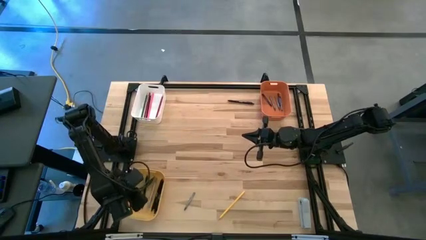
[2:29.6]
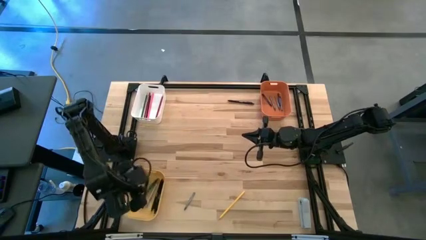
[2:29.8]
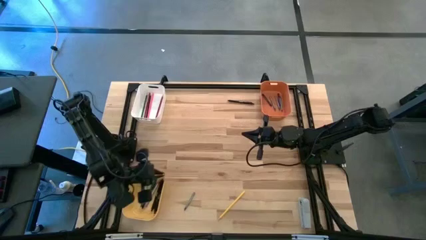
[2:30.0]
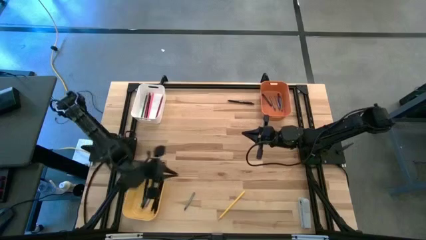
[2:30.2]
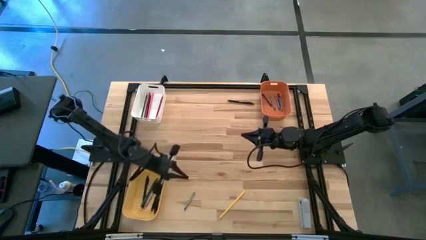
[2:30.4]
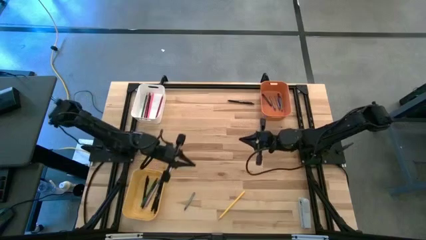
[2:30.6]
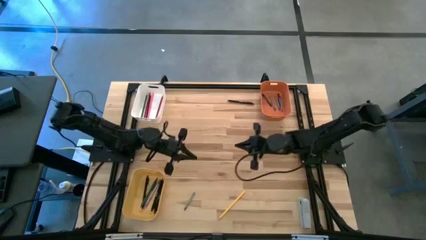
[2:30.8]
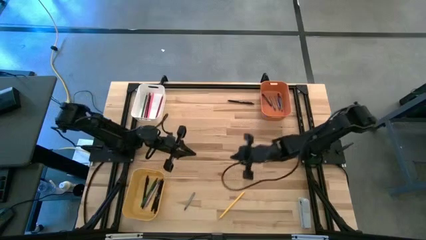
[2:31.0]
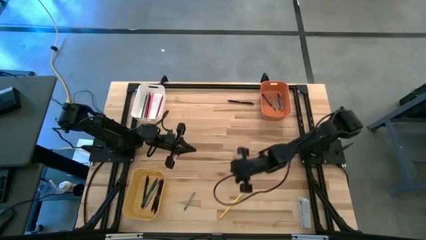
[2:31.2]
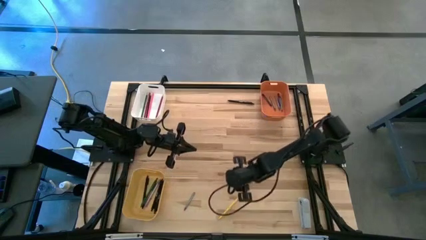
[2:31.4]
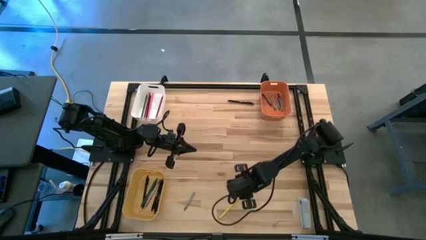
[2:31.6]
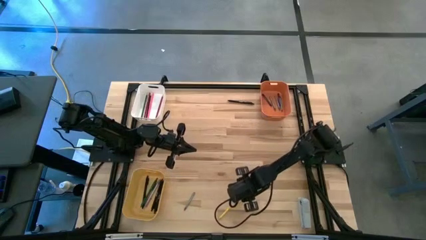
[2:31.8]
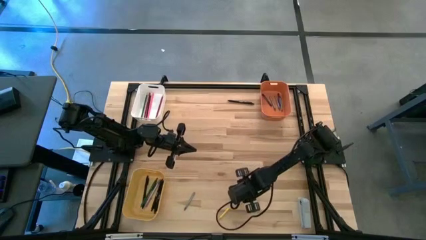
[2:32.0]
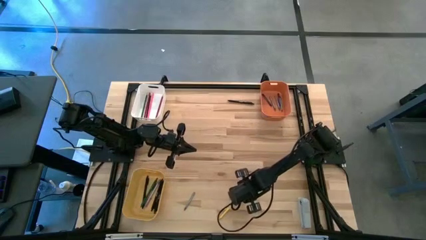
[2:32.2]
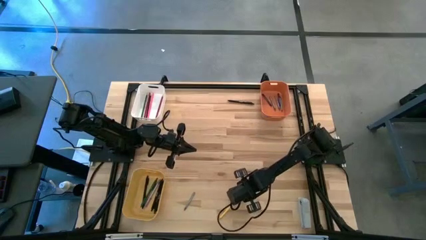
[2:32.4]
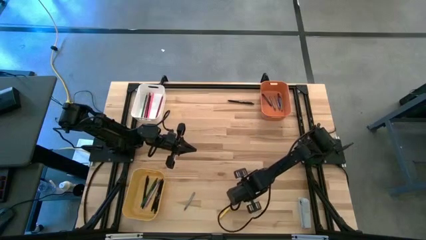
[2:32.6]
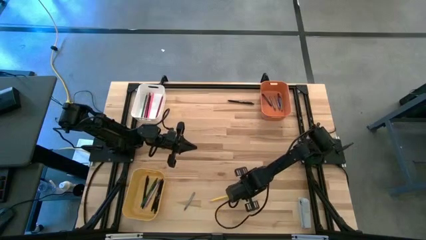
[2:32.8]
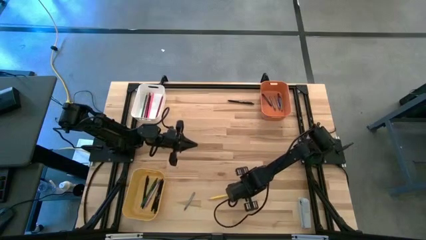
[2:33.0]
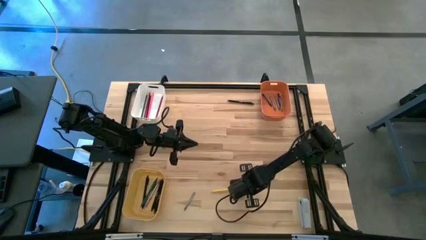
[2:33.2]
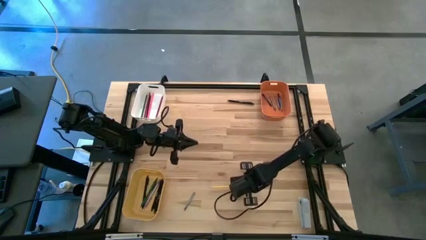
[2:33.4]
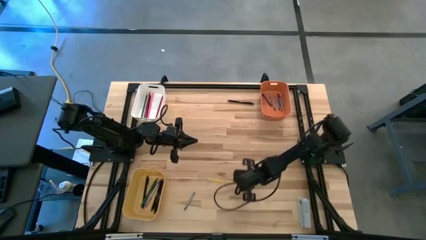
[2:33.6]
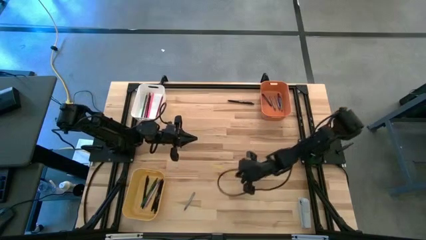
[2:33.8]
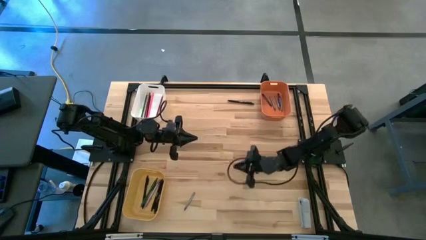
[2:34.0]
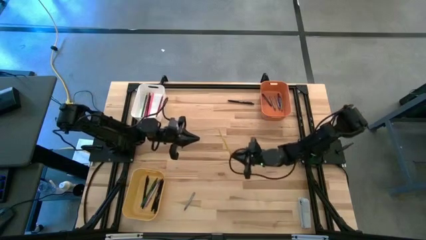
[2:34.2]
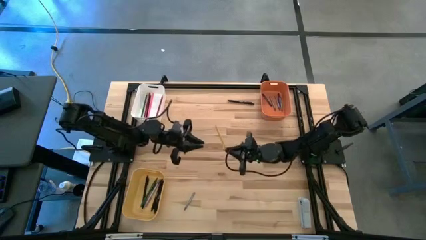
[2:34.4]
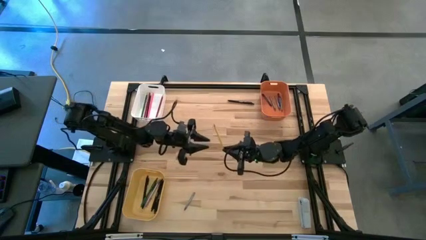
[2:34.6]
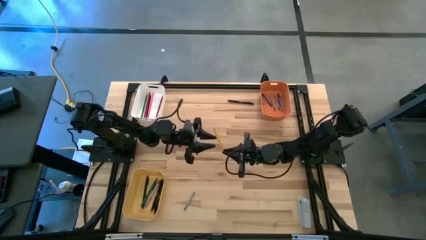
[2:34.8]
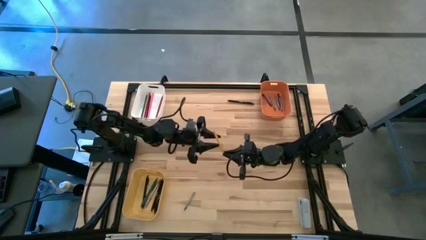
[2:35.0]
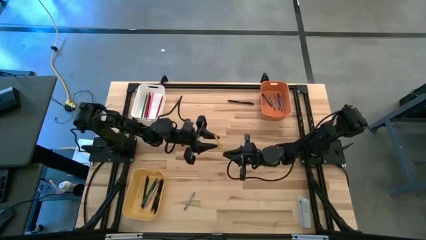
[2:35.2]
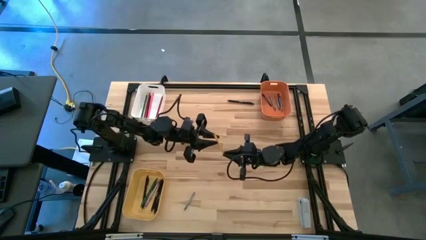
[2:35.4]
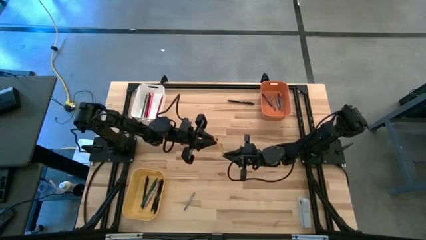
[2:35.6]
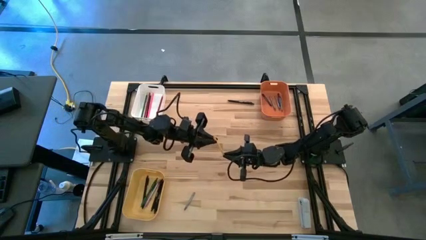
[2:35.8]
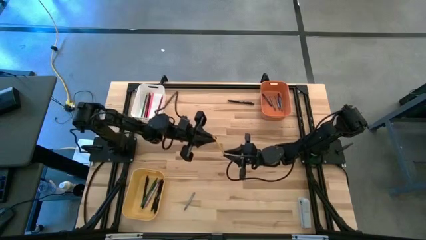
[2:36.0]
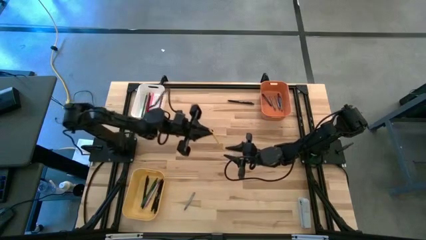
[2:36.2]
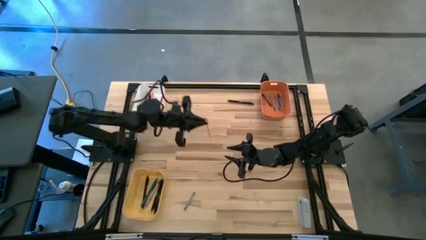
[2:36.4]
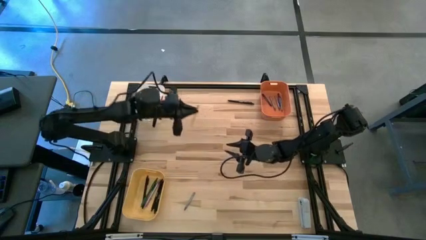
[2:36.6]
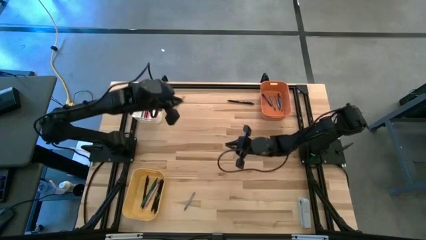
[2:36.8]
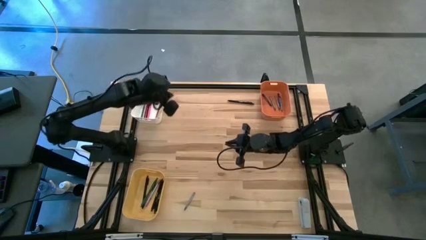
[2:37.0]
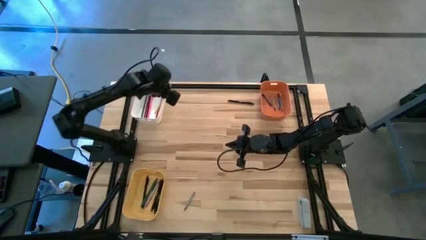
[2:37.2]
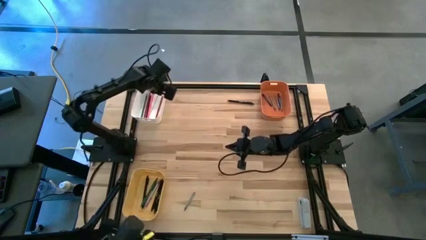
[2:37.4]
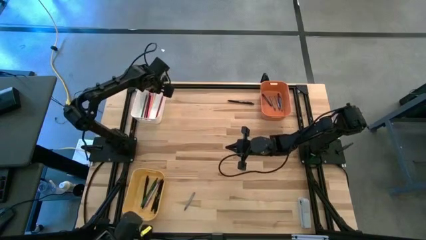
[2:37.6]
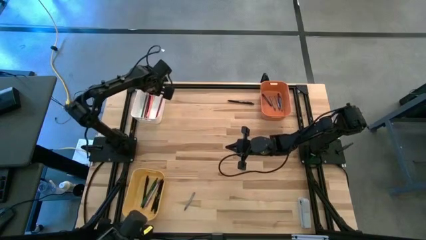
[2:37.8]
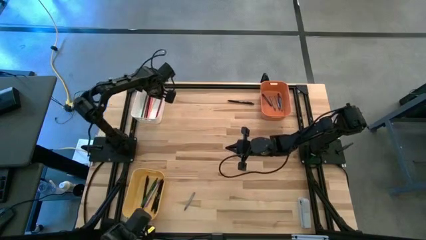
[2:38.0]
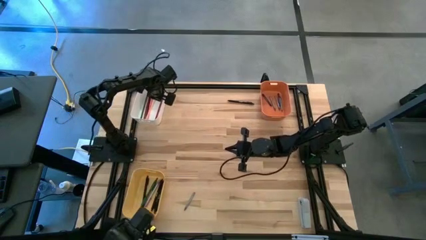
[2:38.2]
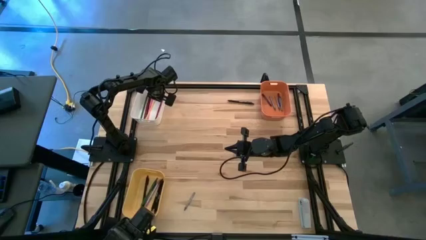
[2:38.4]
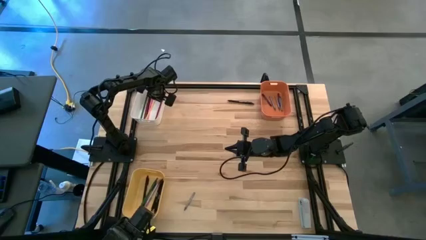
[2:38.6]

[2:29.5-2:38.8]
Task: Sort crayons/erasers/pens/pencils in bins
Put the yellow pencil into the white bin

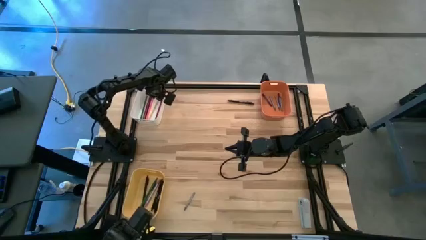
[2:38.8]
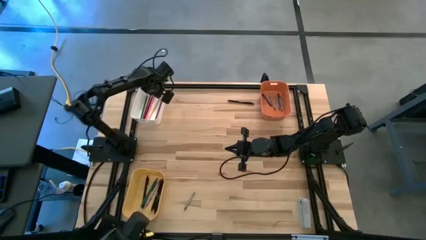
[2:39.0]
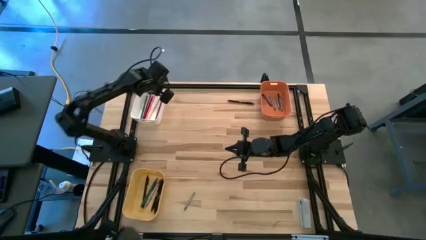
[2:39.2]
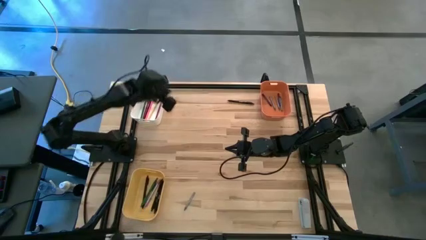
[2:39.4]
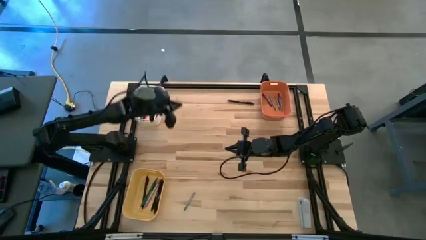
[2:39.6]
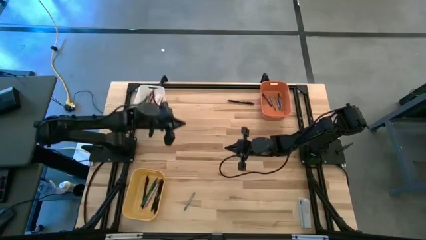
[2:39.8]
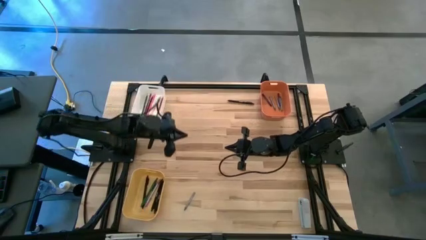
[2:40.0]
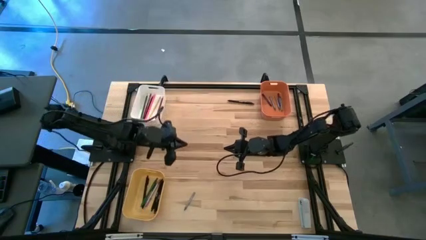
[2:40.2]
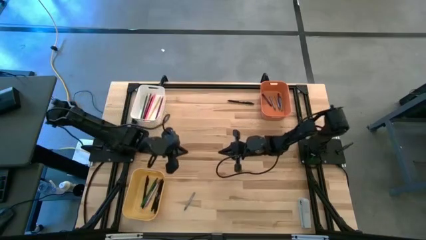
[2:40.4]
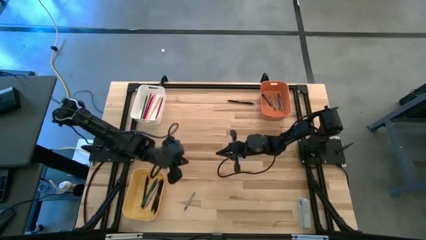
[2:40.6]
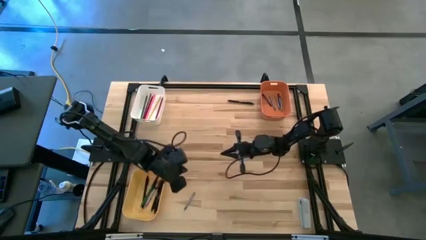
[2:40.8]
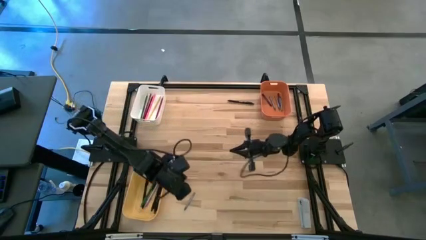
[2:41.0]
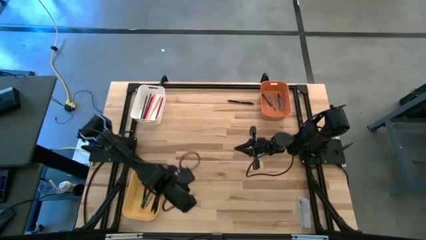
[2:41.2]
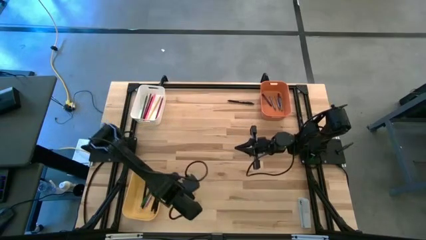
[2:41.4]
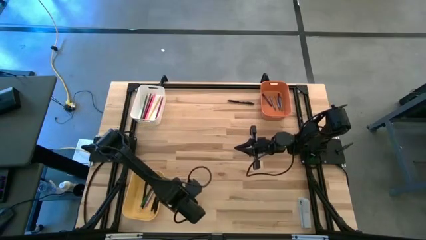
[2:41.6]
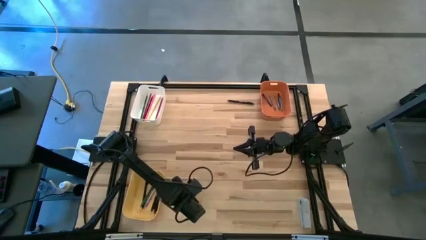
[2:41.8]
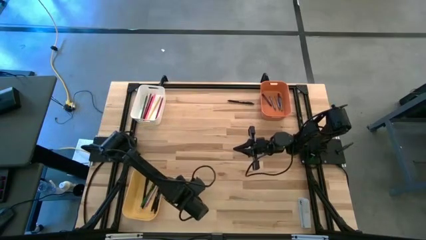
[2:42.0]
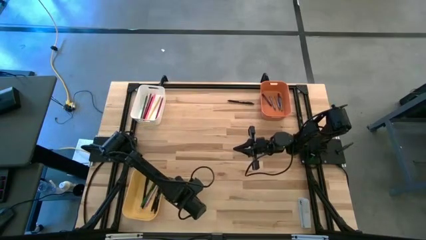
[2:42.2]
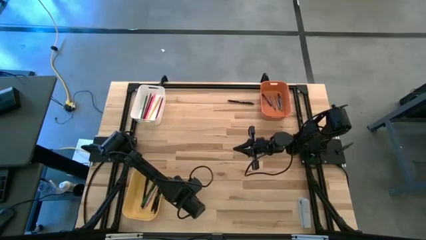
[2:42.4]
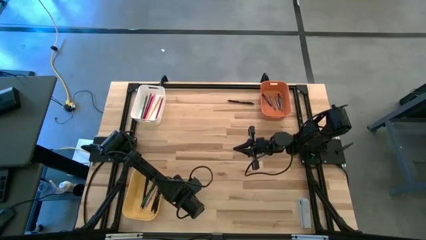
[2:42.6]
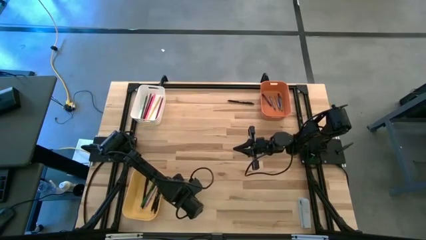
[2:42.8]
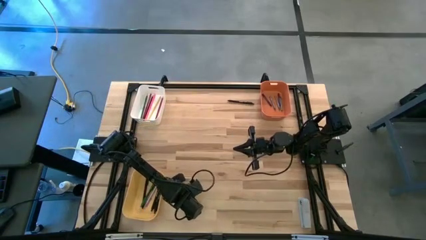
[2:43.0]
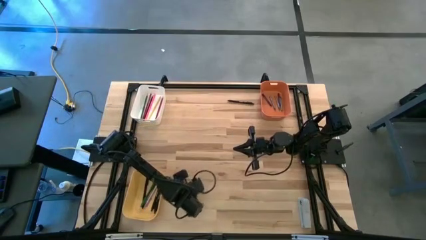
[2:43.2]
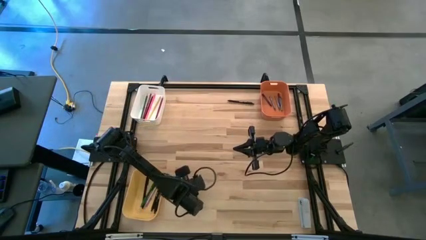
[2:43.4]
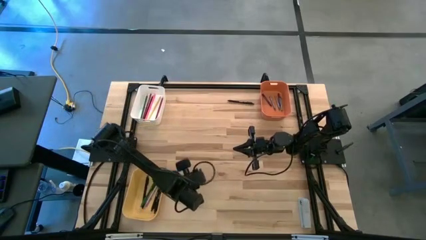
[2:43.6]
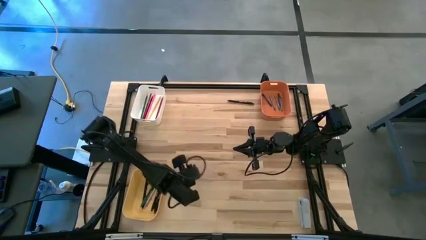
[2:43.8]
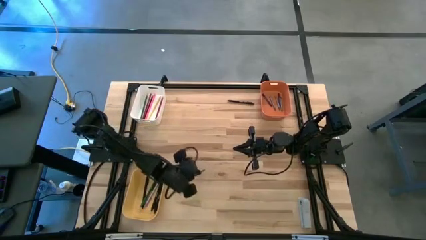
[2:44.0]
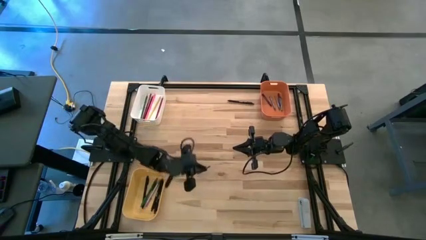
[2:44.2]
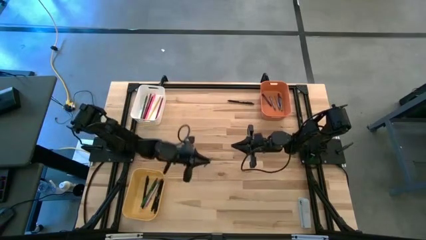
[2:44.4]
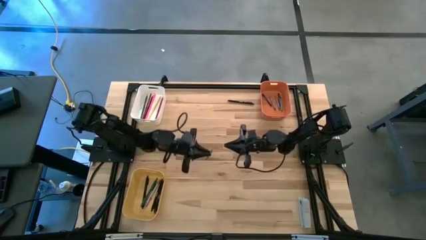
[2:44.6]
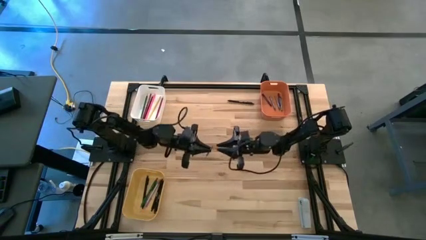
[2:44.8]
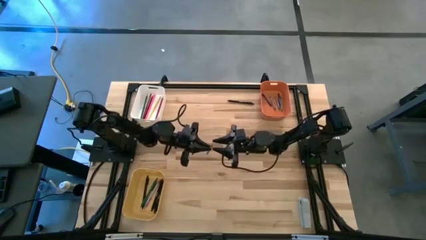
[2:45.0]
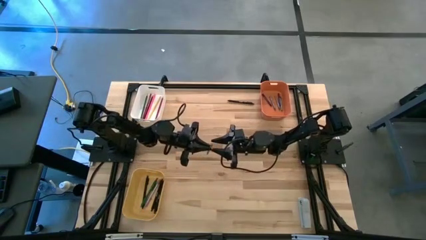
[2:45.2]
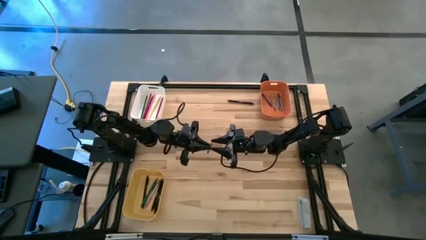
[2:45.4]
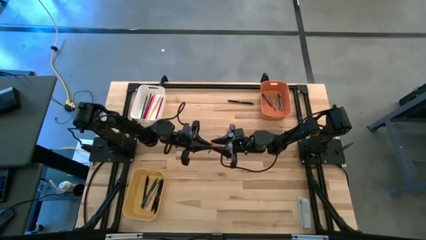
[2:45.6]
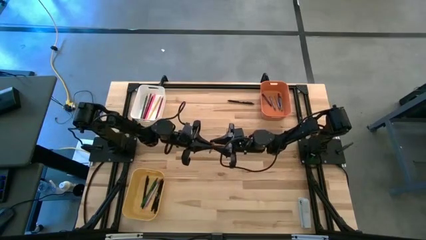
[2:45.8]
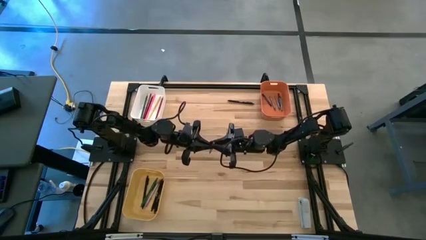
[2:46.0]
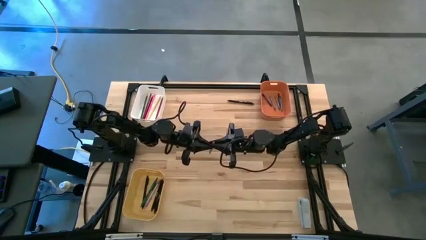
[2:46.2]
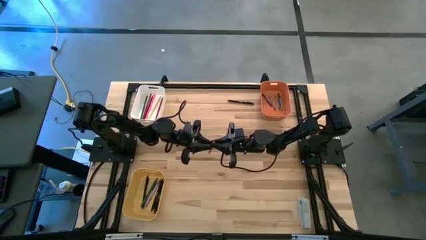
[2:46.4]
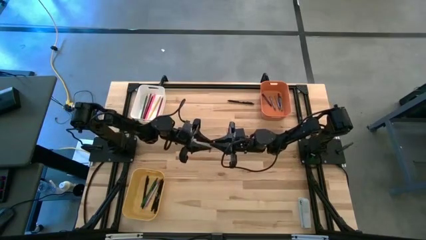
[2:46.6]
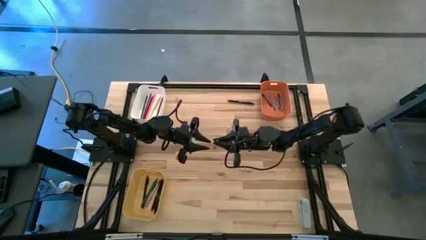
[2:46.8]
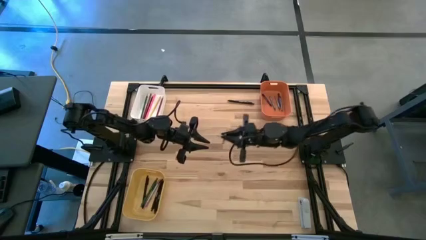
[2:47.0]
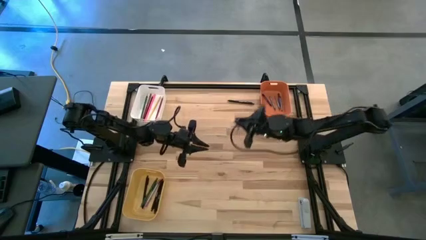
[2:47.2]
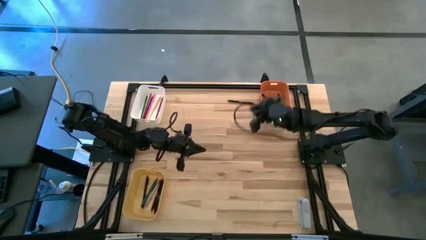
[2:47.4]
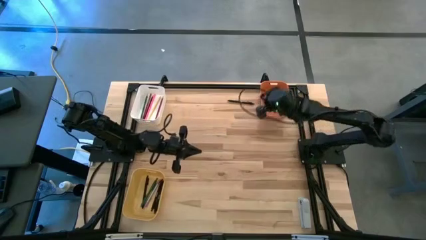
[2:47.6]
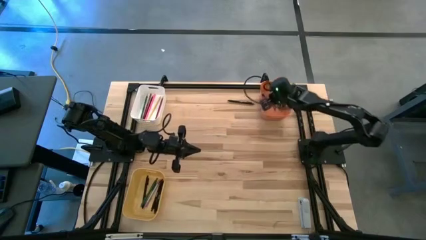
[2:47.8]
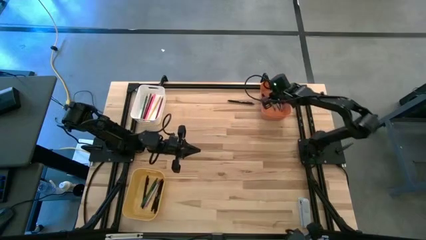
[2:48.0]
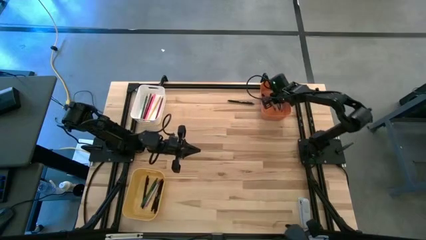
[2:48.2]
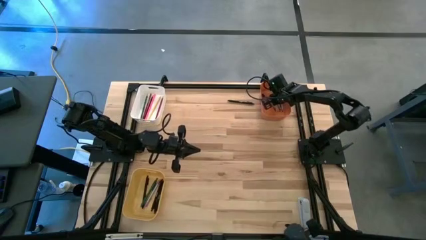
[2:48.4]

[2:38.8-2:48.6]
Put the gray crayon into the orange bin
